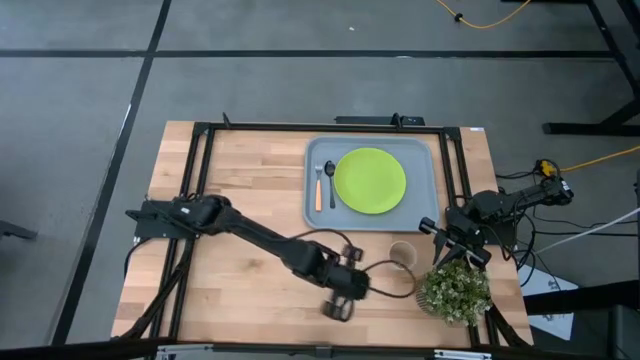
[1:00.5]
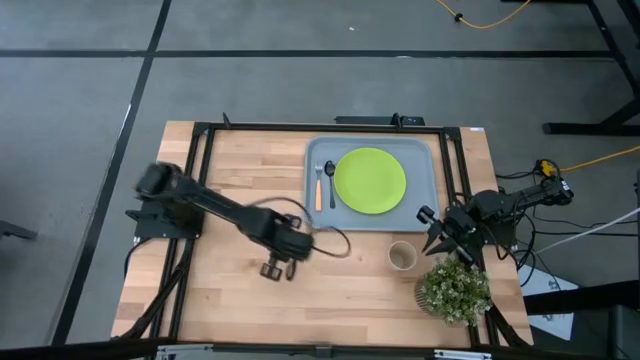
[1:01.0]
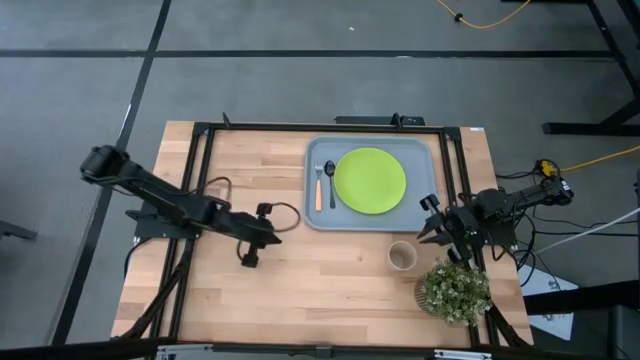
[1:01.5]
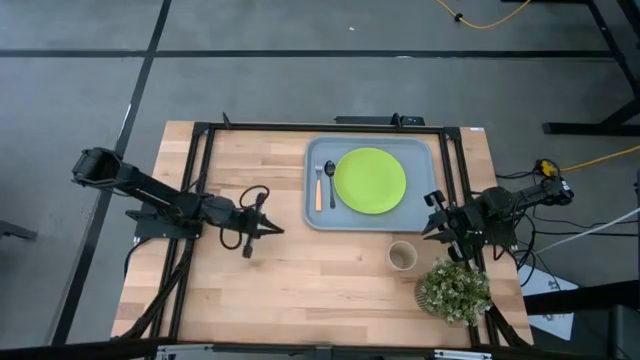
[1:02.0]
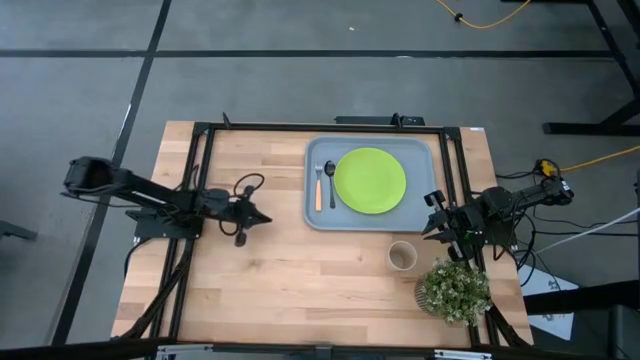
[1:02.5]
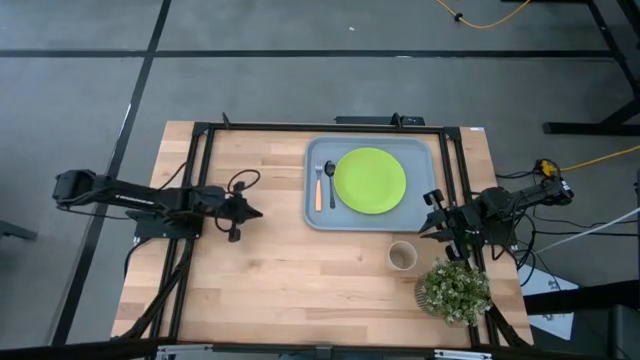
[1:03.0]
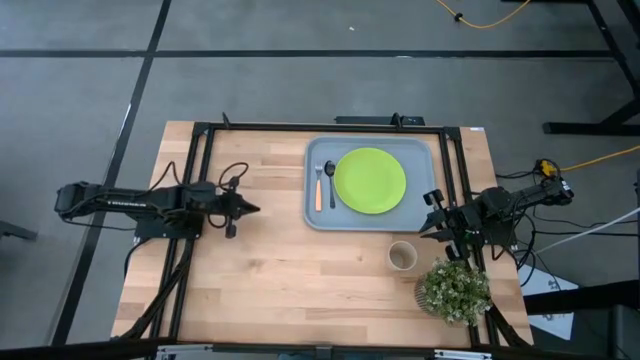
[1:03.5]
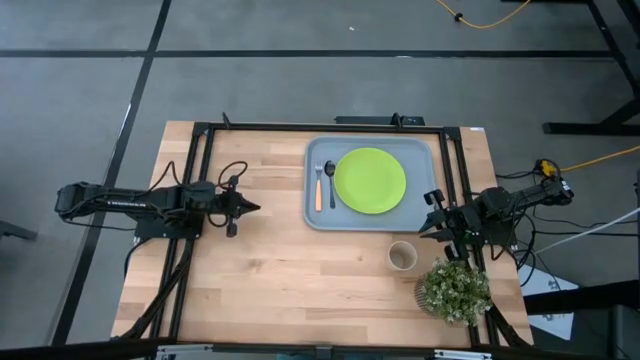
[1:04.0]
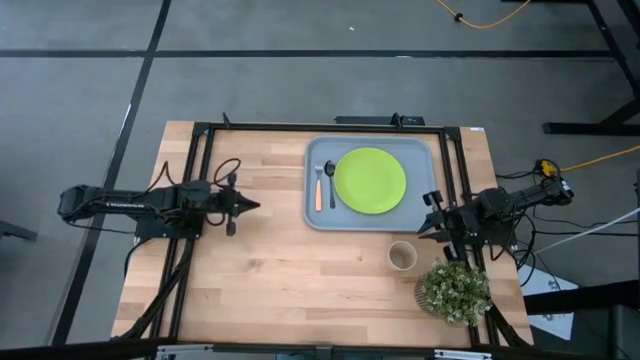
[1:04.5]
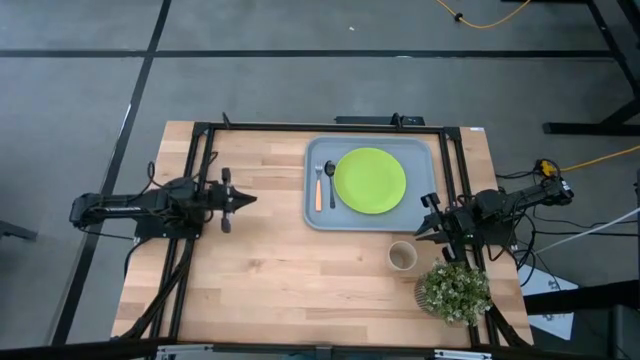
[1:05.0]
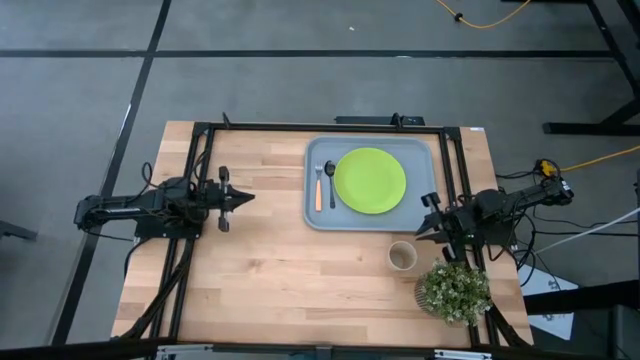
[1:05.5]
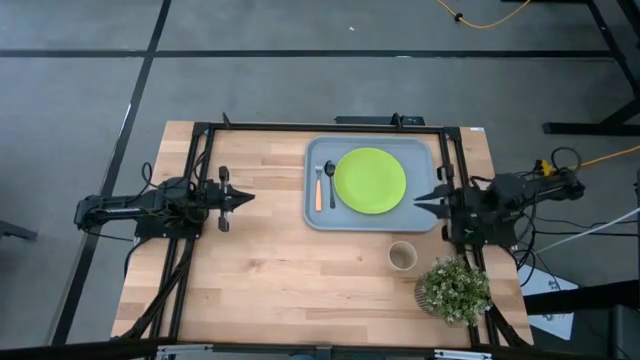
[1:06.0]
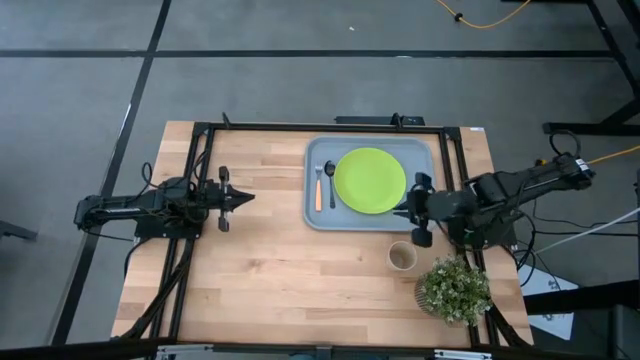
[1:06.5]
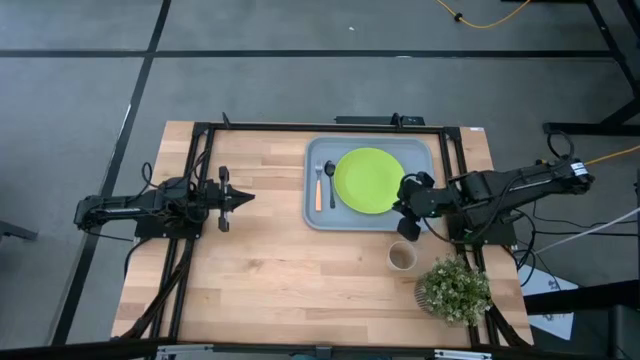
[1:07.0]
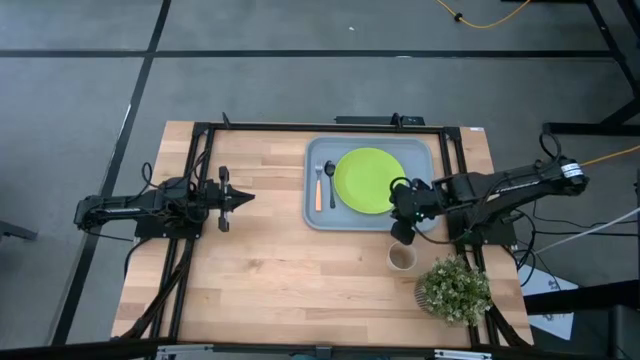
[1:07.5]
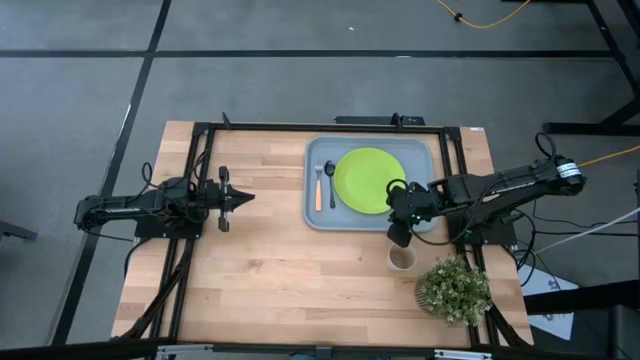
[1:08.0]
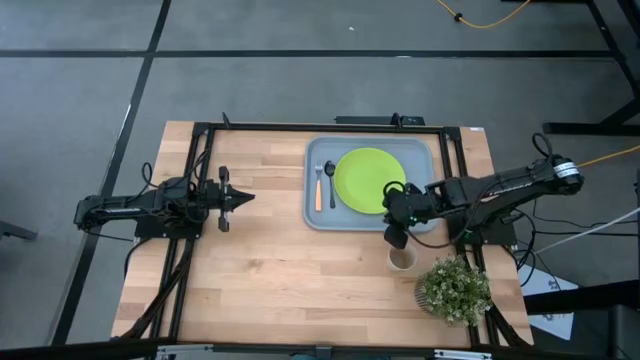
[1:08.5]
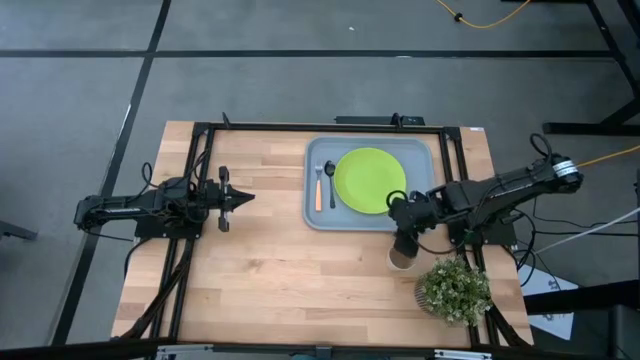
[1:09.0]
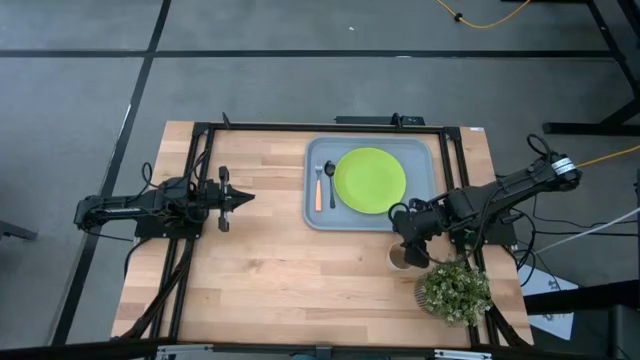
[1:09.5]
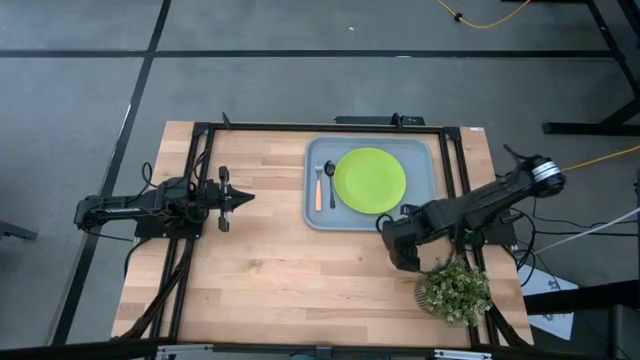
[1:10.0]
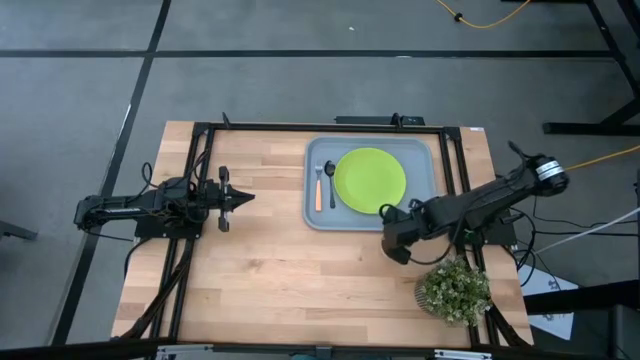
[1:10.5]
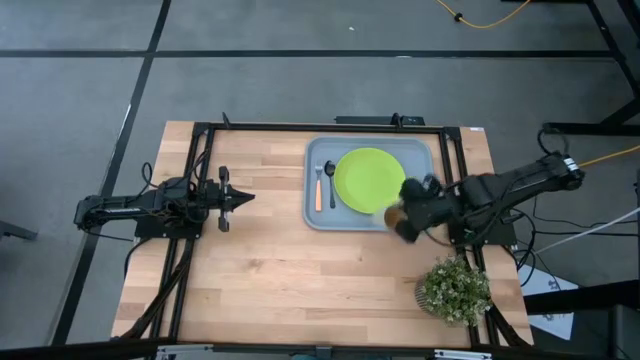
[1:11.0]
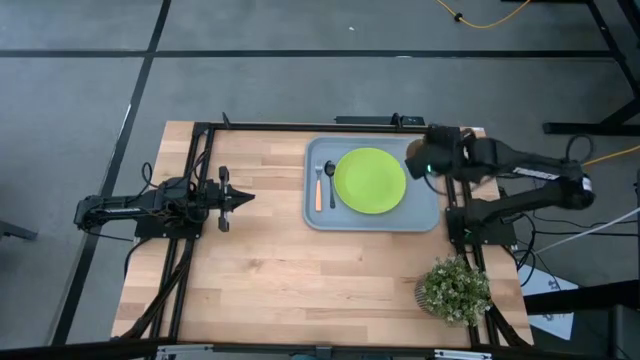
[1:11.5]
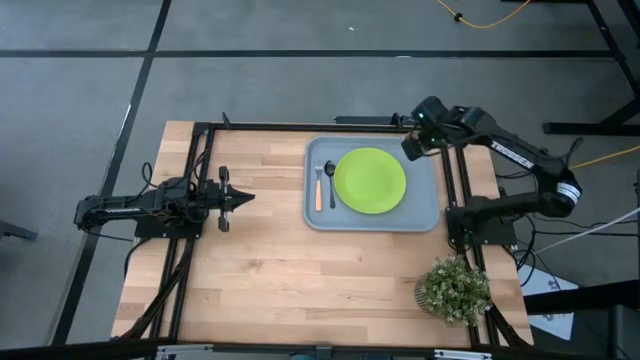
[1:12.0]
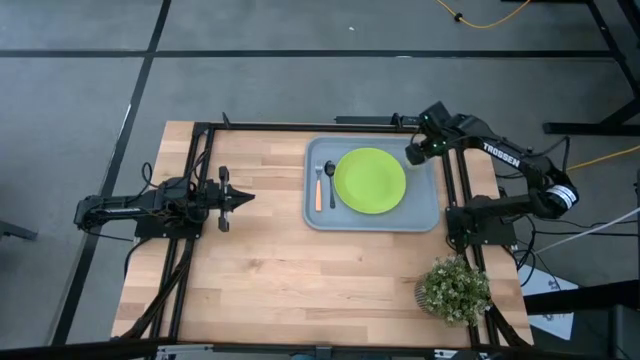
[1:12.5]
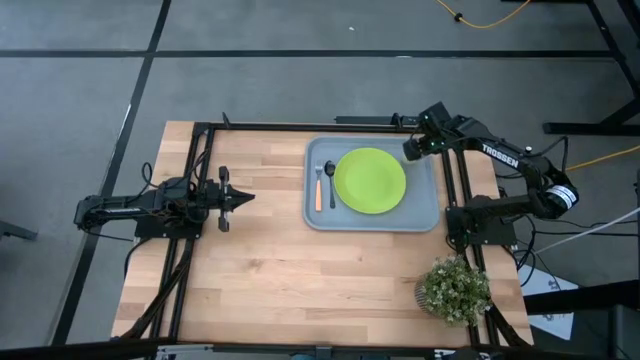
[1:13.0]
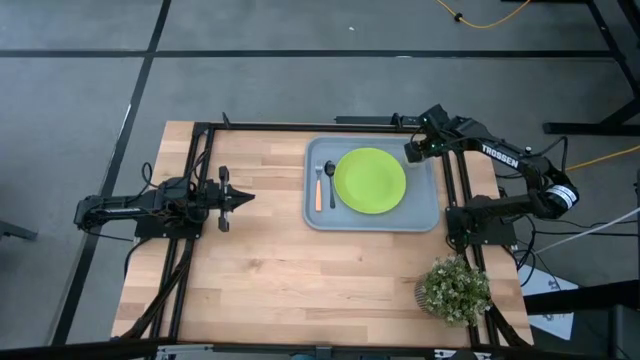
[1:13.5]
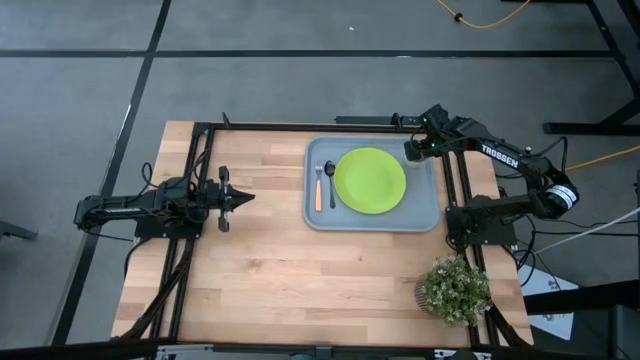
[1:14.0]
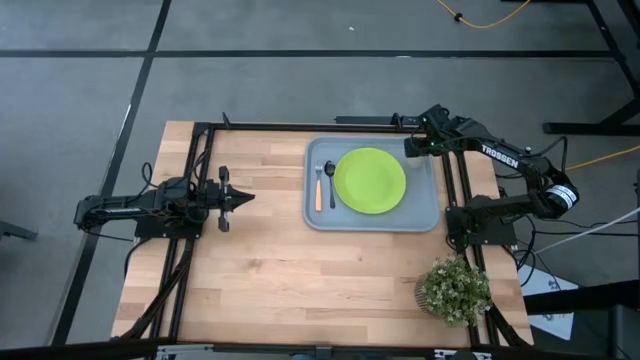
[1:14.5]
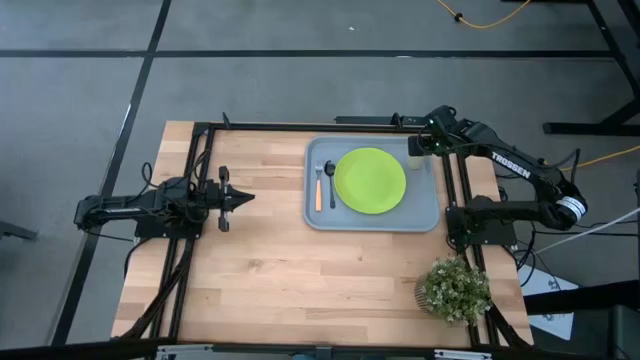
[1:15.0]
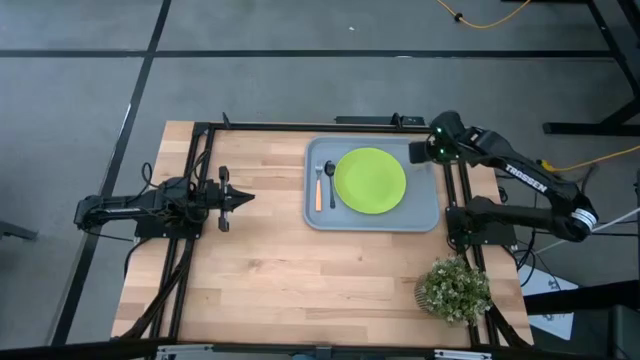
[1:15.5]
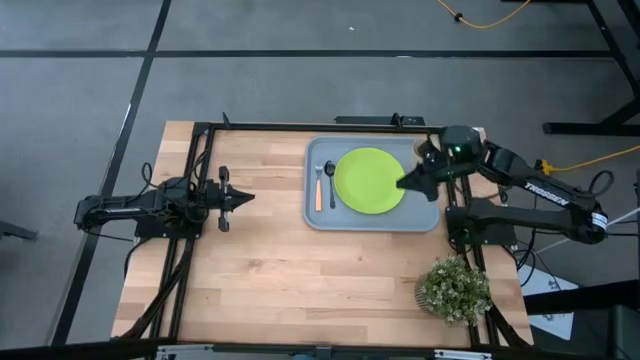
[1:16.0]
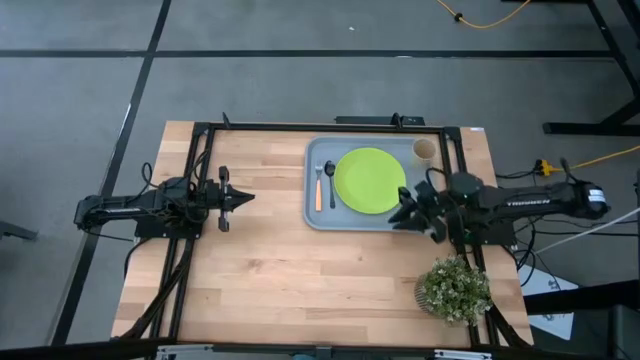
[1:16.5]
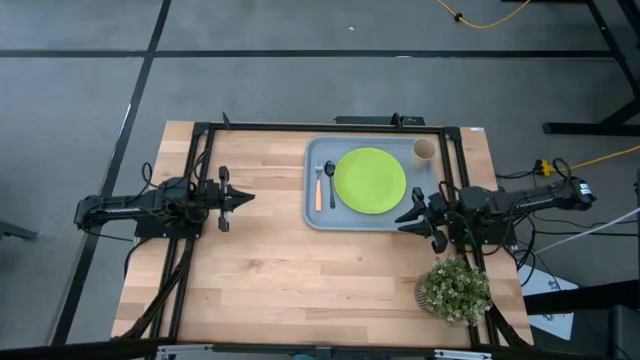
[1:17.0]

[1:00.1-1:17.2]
Task: Pick and place plate/cup/fork/spoon on tray
Put the white cup on the light blue tray to the right of the green plate

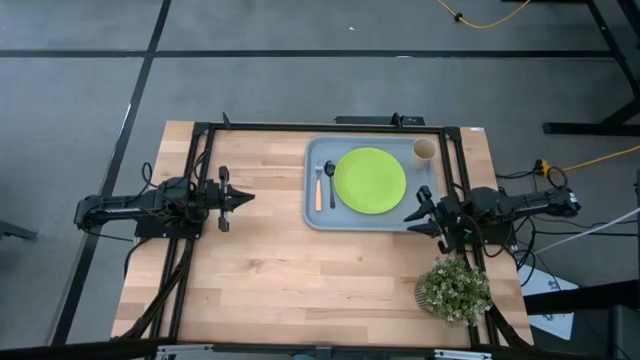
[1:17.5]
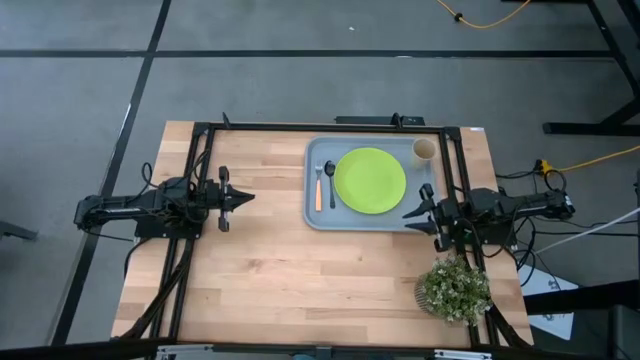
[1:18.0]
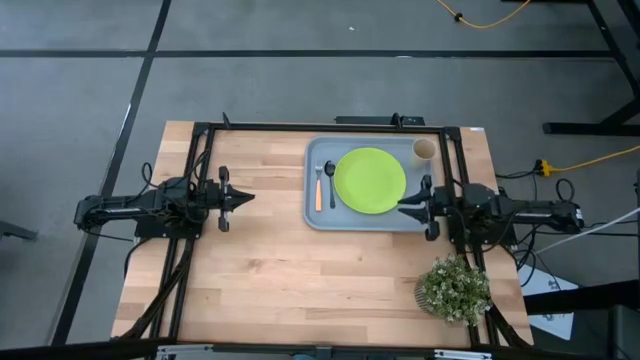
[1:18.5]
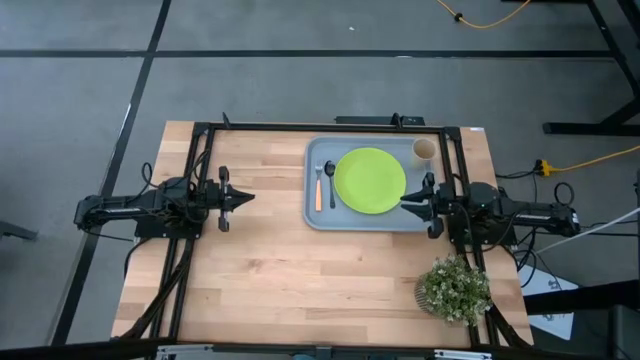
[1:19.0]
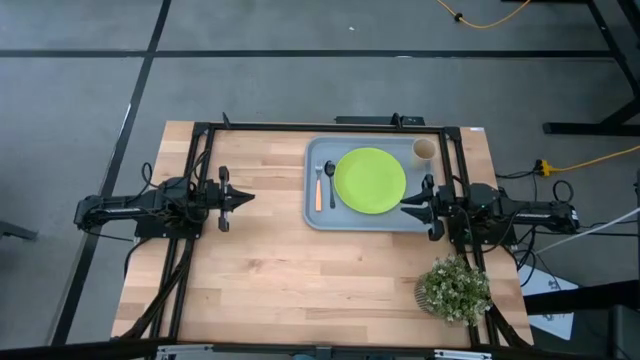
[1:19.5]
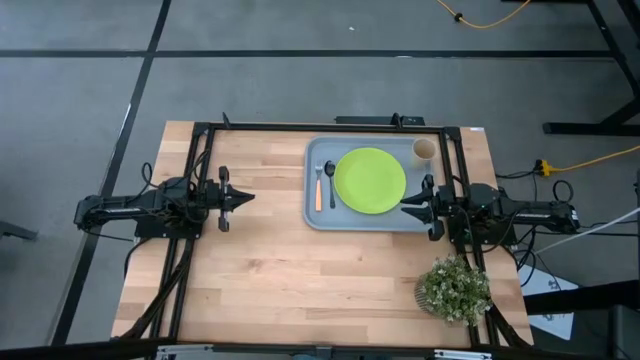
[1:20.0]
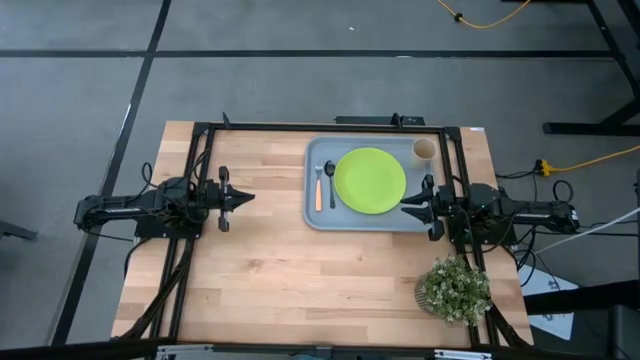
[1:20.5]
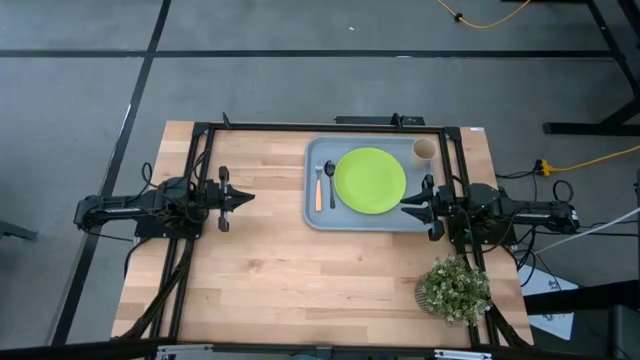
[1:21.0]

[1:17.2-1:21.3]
Return to Home Position

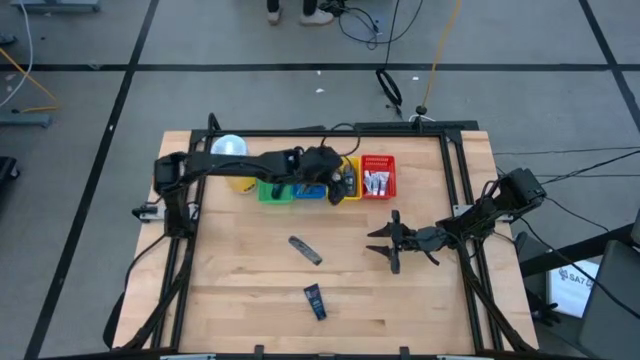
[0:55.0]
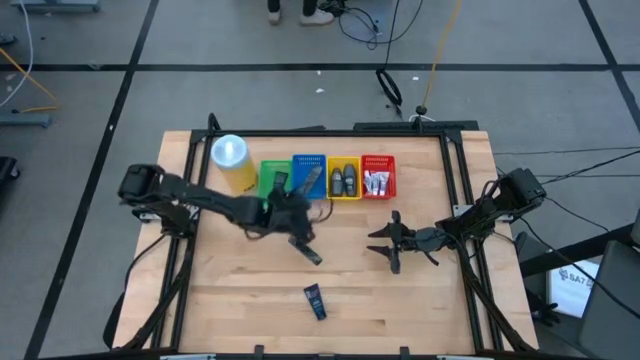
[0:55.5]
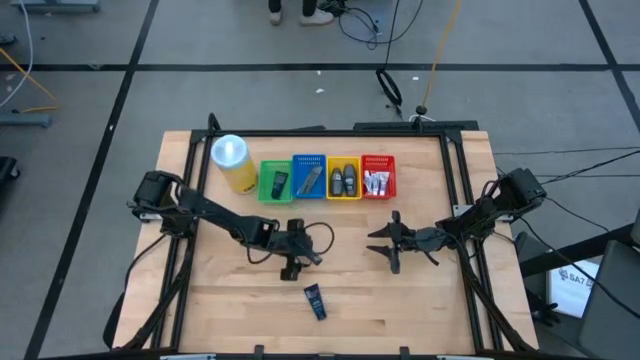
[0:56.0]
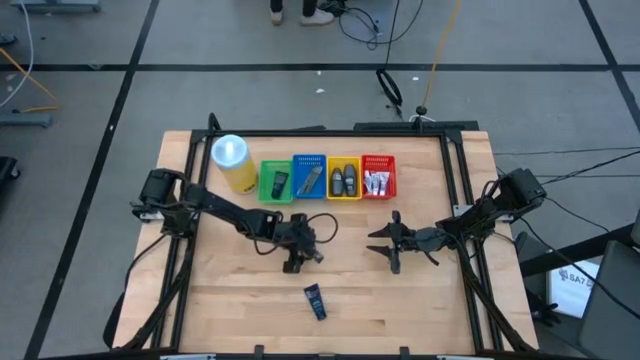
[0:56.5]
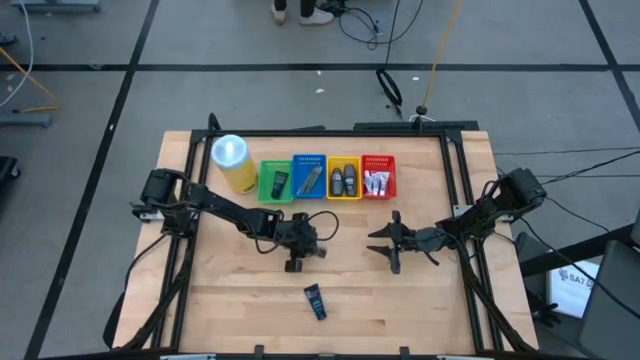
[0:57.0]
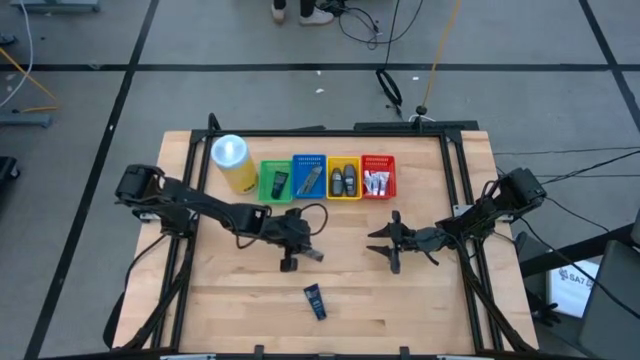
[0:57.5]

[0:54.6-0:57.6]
Task: Pick & Place Travel size toiletries
Put the hair comb into the blue basket
